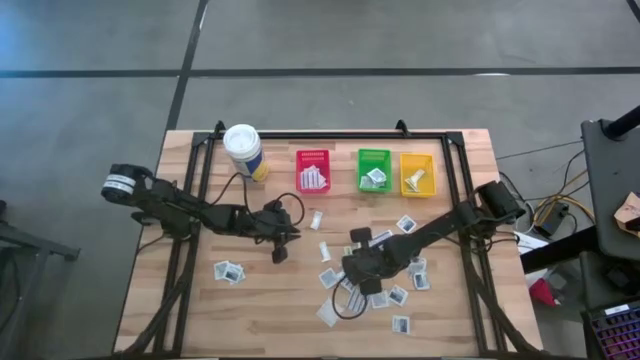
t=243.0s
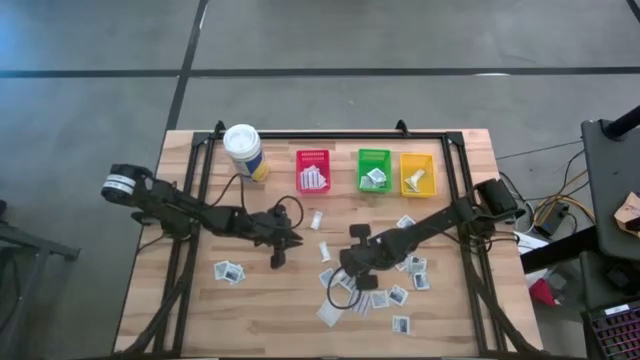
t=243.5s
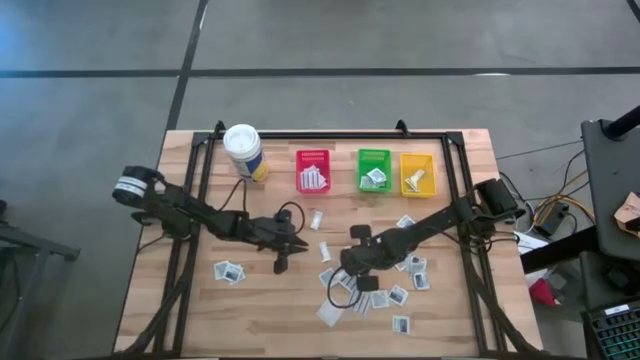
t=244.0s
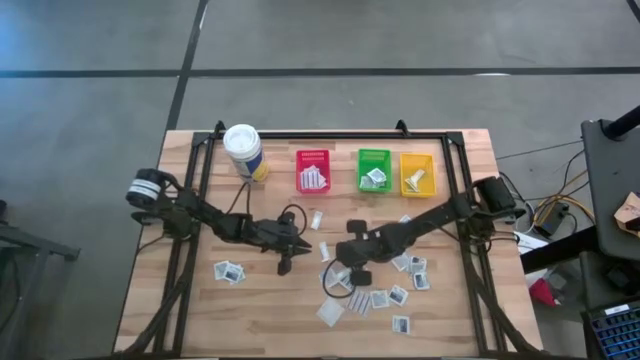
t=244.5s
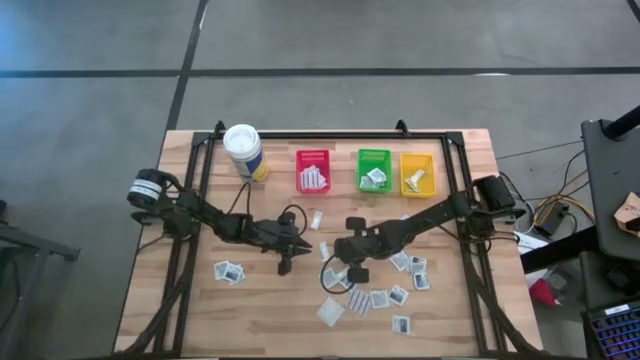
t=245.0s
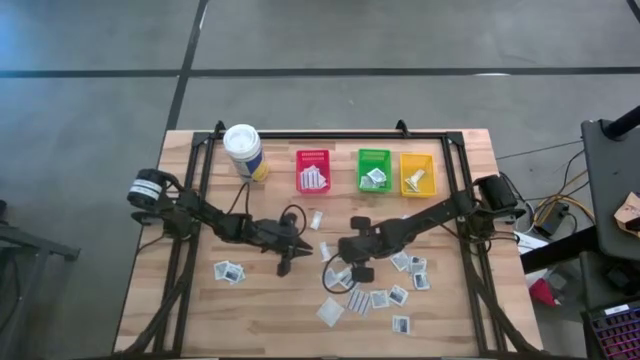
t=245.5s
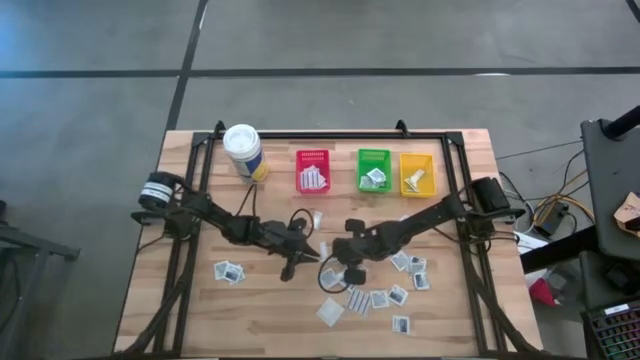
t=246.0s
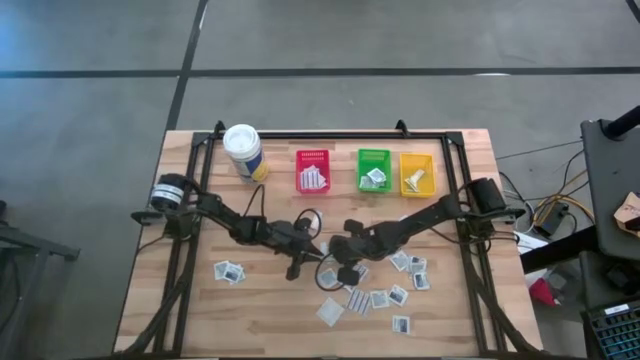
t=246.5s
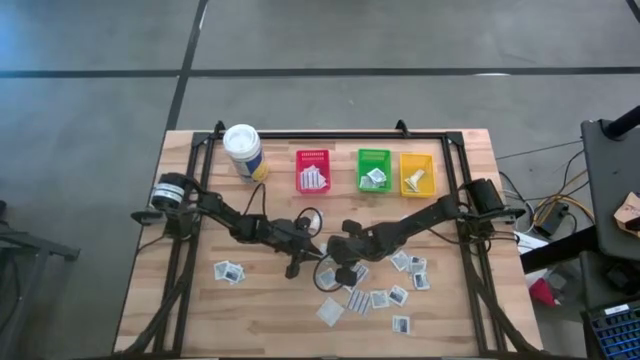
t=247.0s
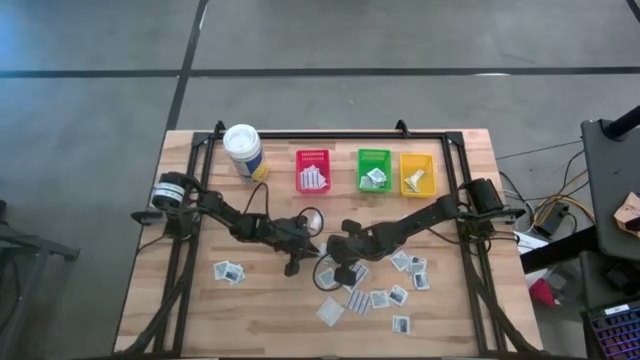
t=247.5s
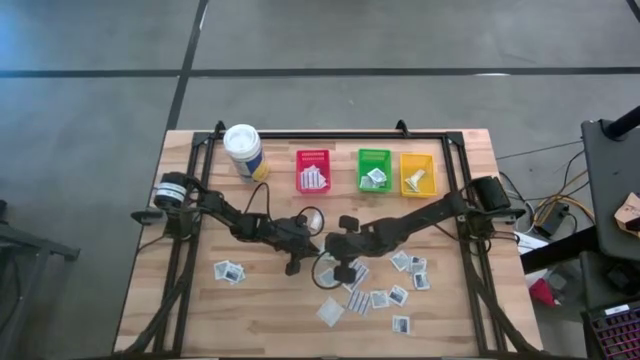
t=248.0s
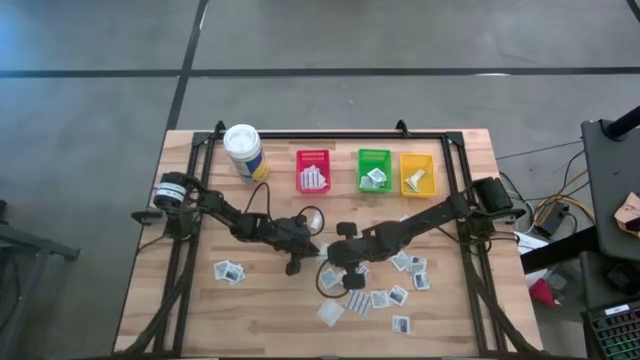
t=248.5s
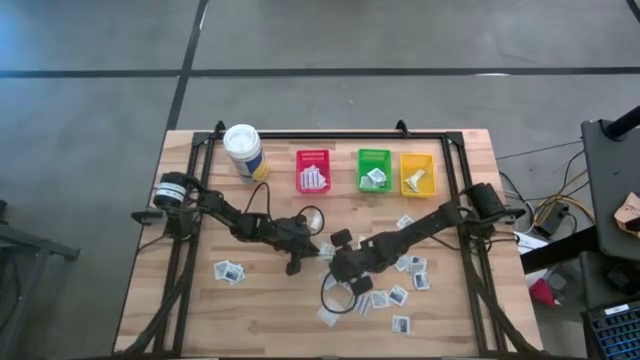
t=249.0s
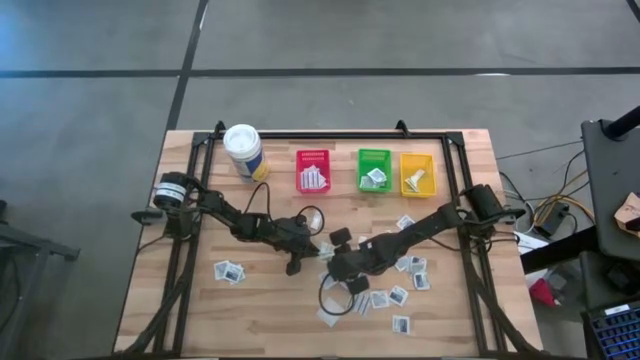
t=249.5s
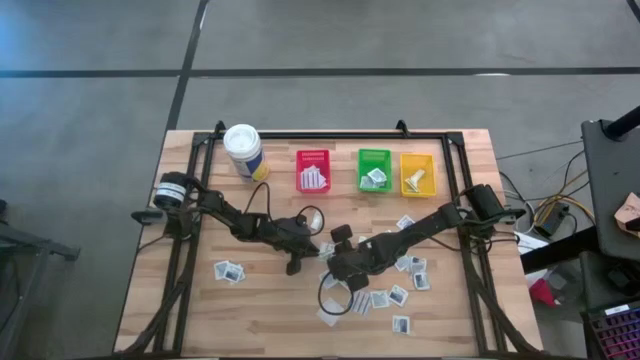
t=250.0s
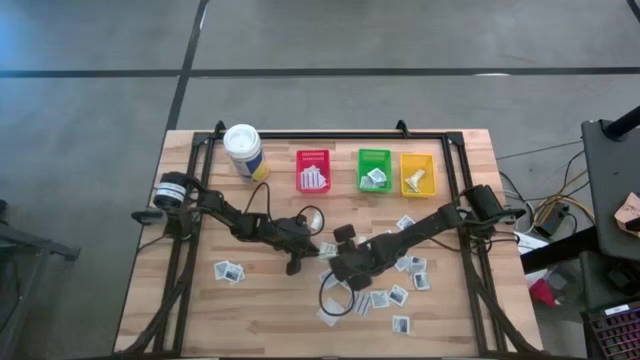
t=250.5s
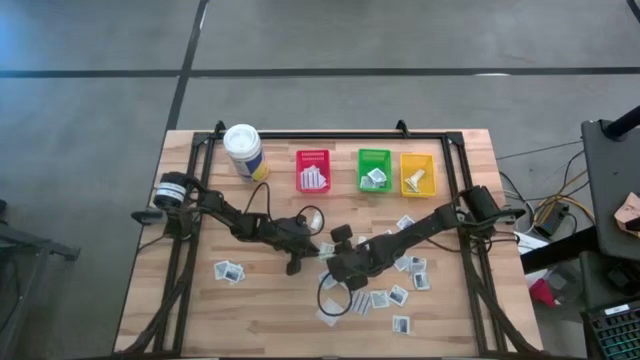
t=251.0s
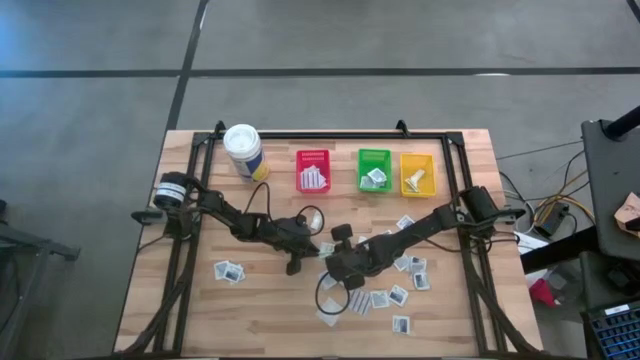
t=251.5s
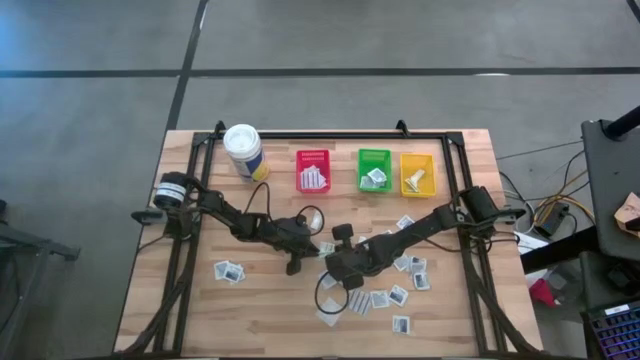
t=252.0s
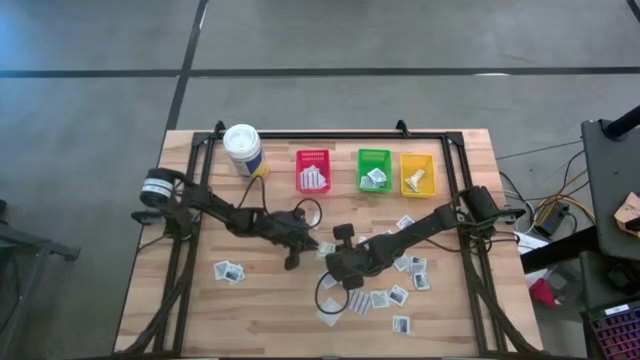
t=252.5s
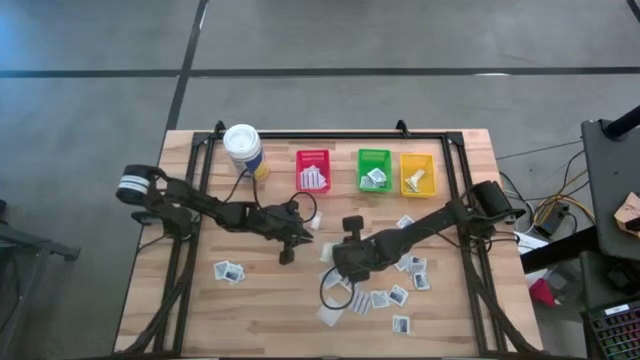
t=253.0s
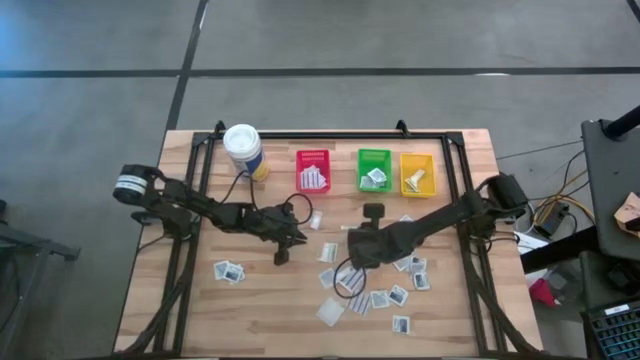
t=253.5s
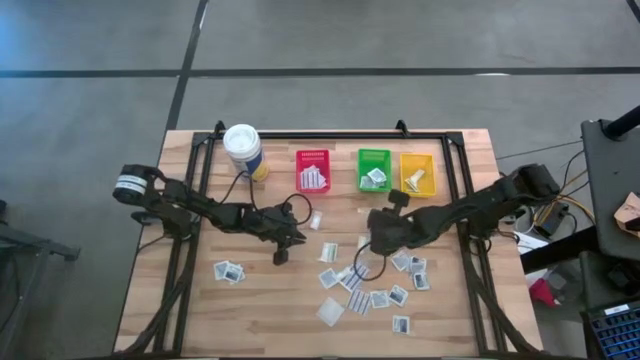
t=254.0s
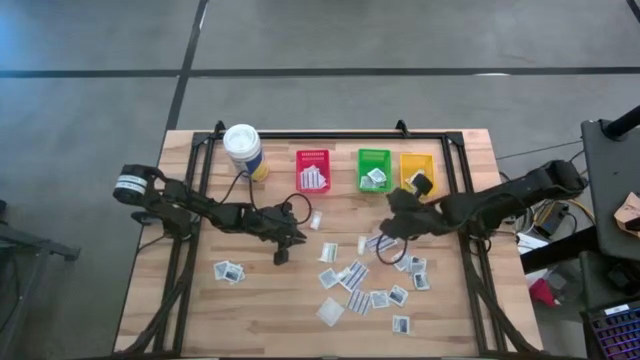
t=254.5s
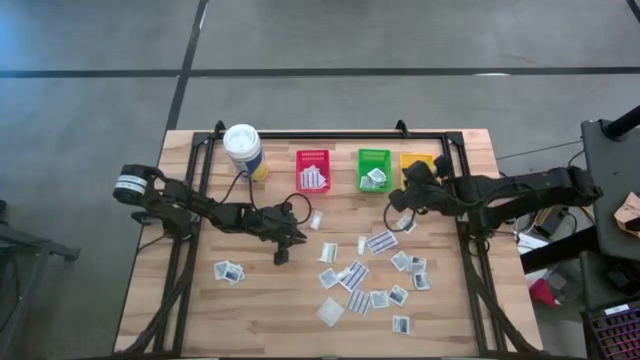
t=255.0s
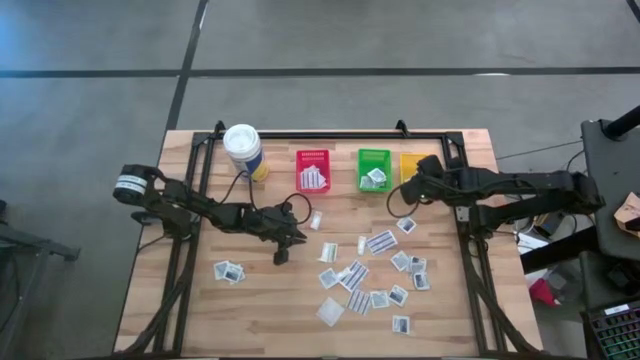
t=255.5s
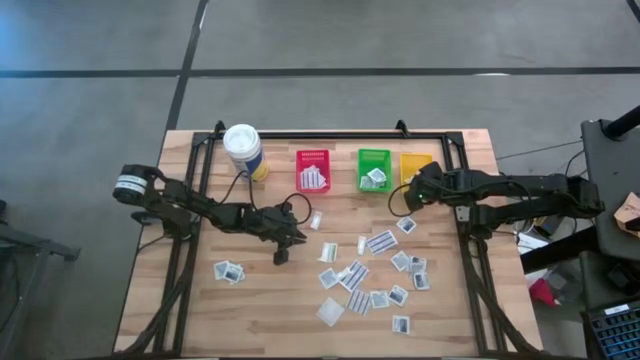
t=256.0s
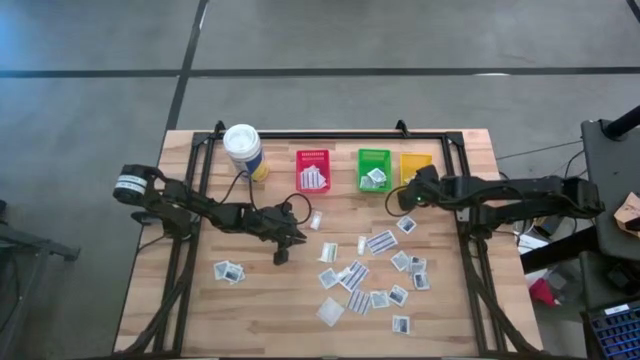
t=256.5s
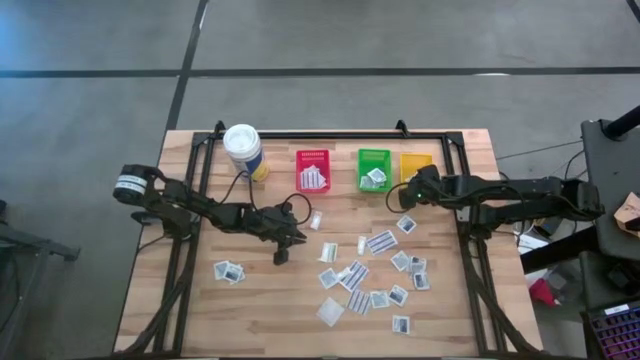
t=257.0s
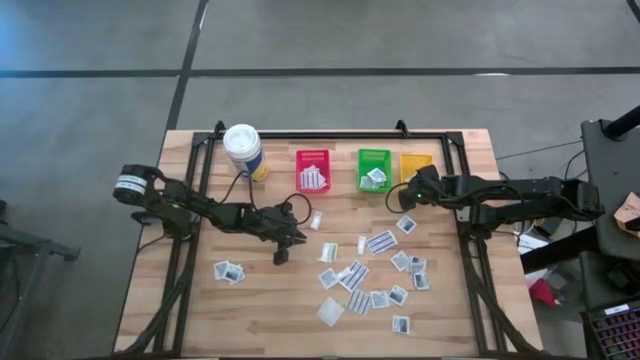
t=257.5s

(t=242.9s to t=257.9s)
Task: Pick & Place First Aid Supplies
Put the green bandage in the yellow bin

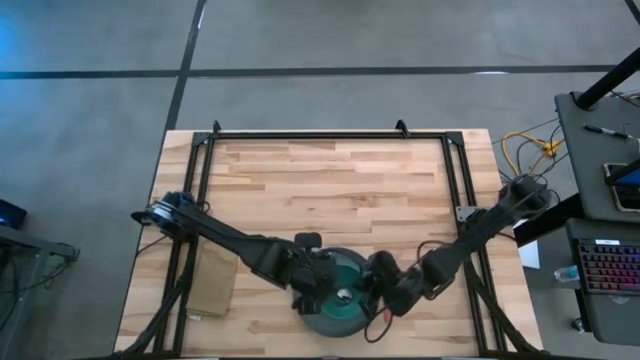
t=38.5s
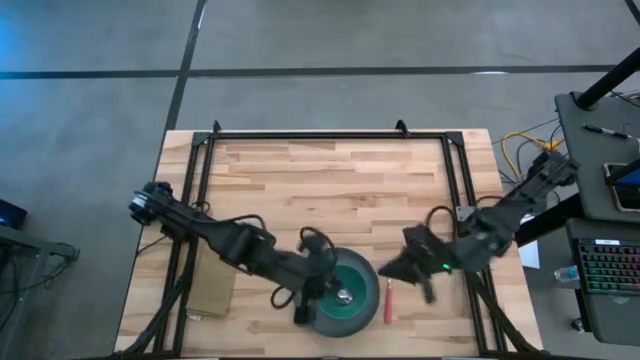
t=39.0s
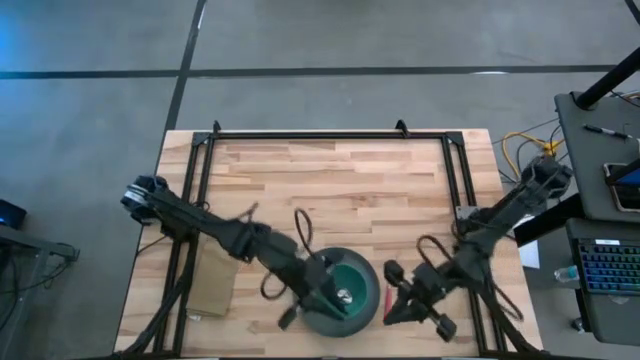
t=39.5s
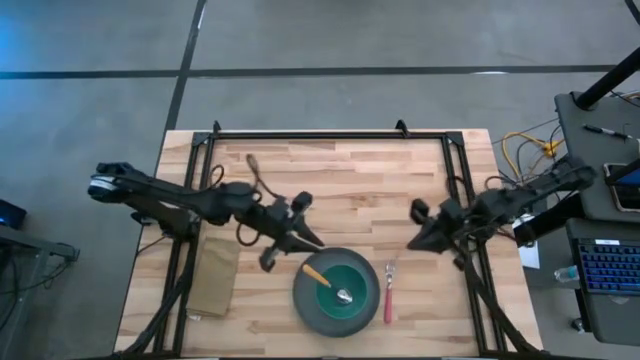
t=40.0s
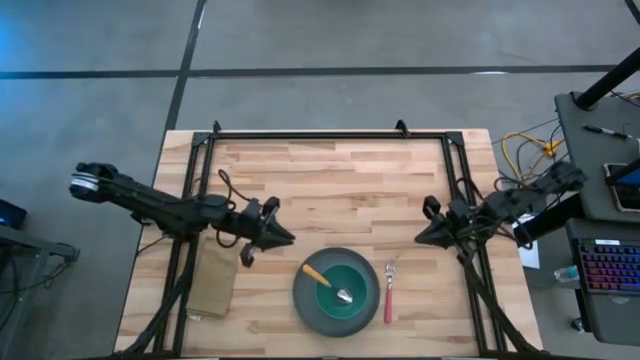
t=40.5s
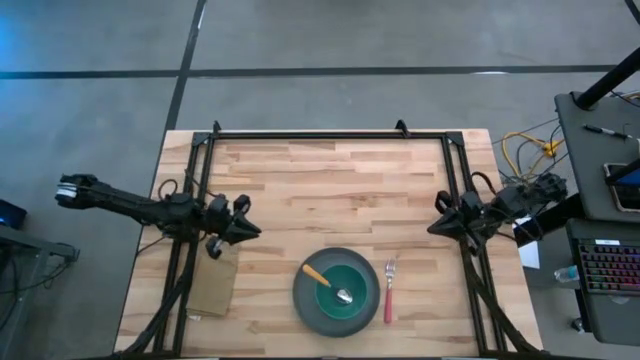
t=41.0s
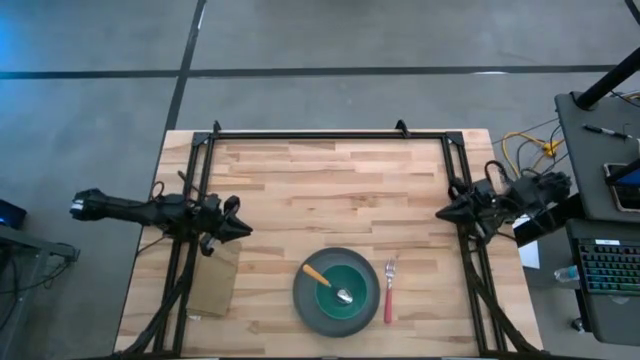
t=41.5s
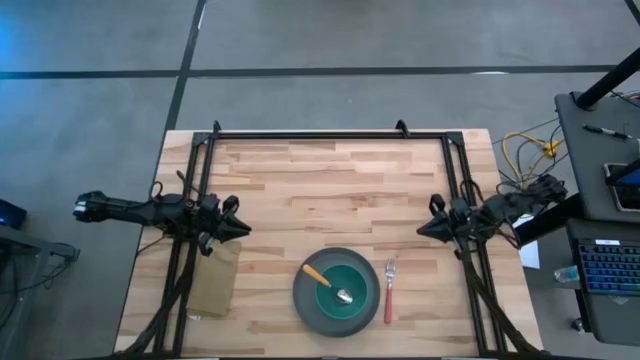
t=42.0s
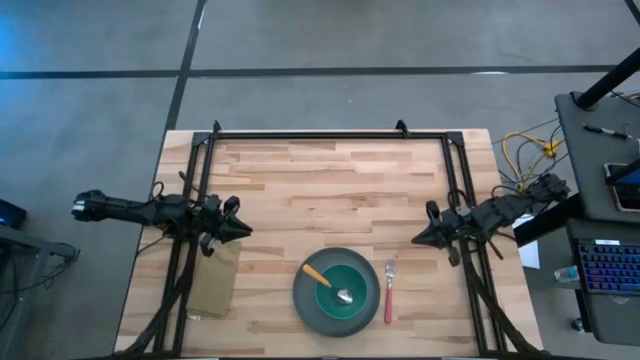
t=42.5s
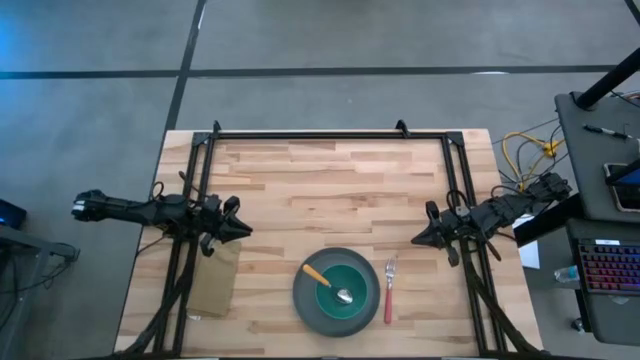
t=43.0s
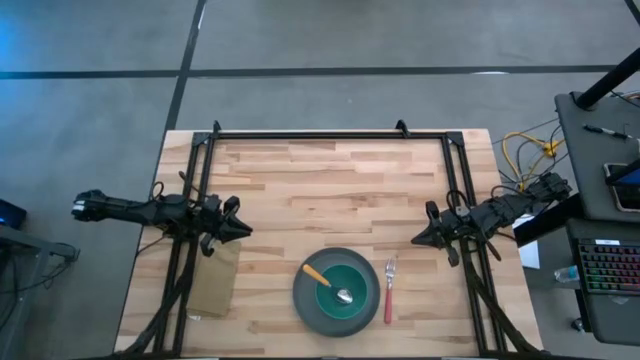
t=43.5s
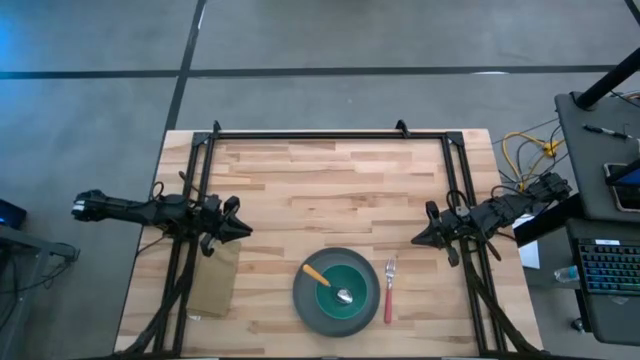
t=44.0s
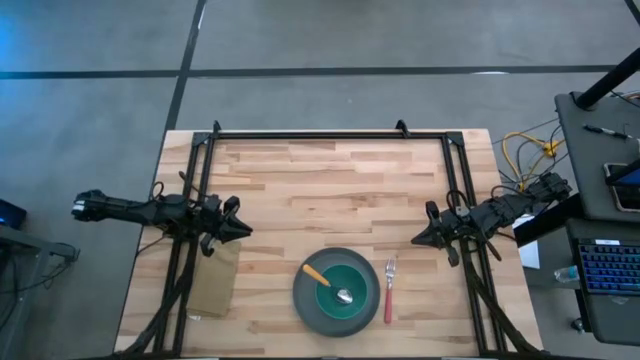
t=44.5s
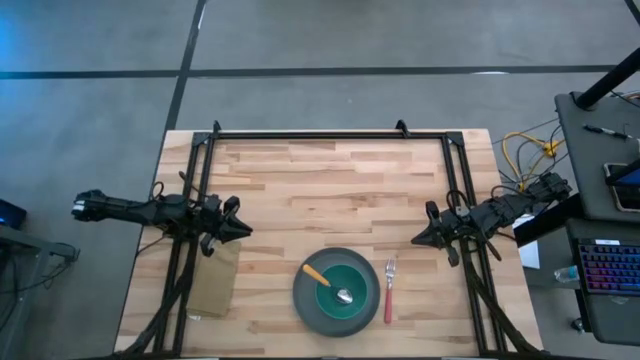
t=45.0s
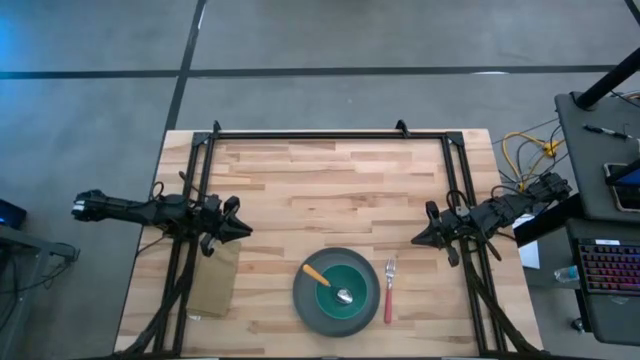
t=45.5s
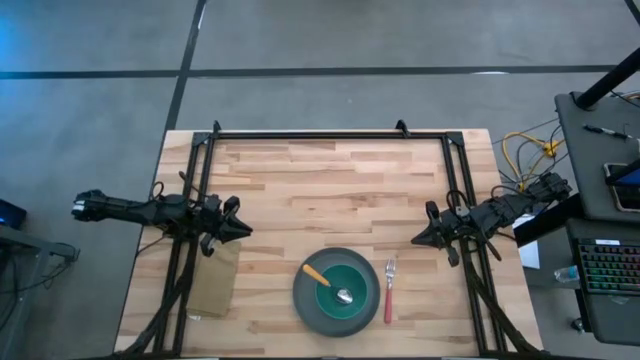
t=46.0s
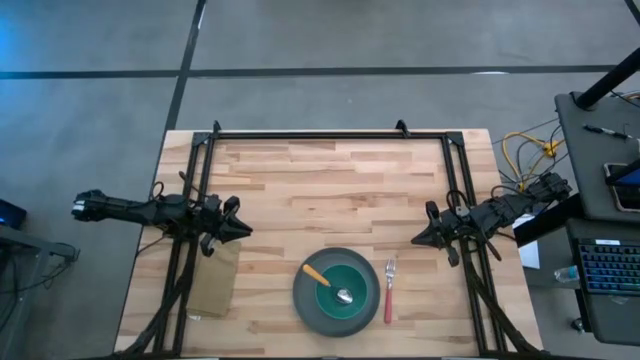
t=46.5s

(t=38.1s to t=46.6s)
Task: Set table place
Return to Home Position
